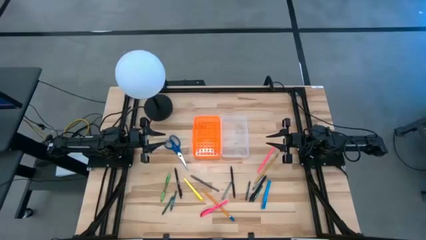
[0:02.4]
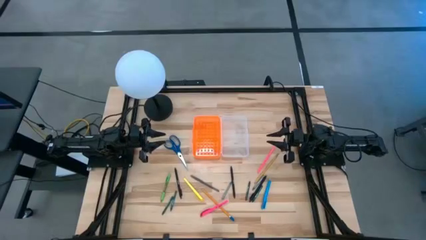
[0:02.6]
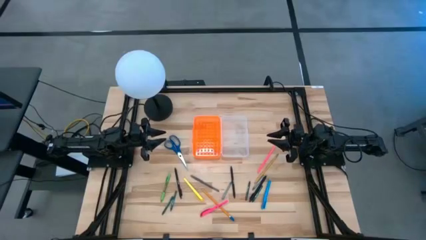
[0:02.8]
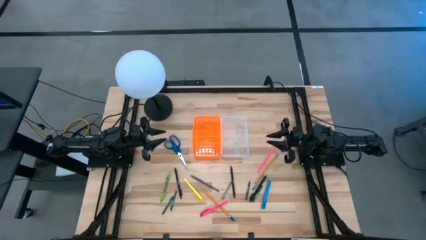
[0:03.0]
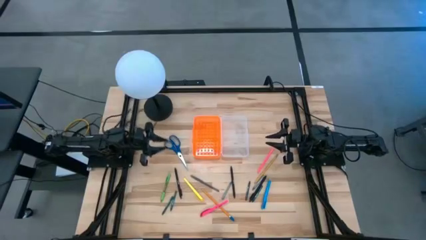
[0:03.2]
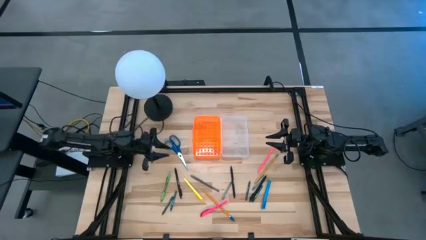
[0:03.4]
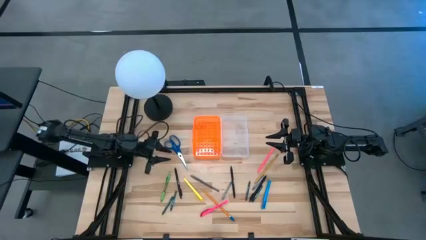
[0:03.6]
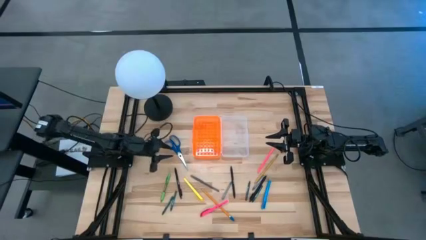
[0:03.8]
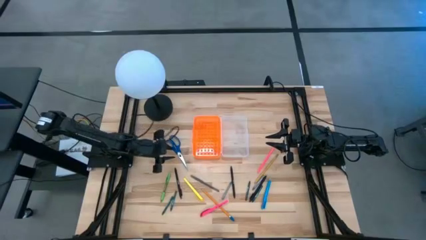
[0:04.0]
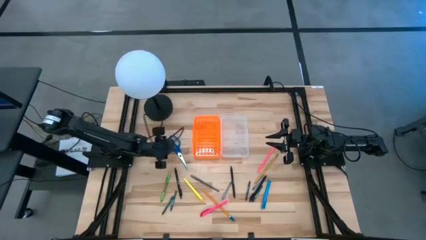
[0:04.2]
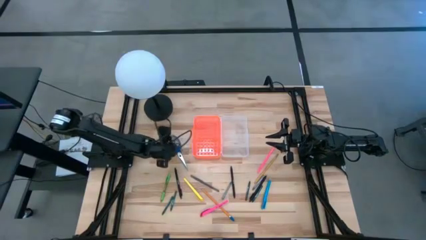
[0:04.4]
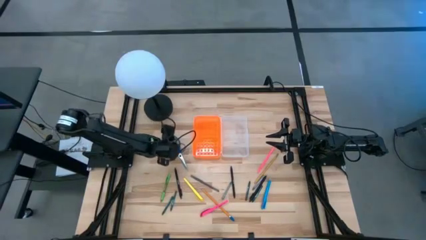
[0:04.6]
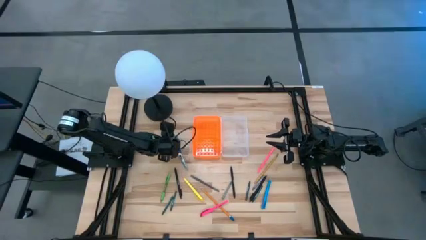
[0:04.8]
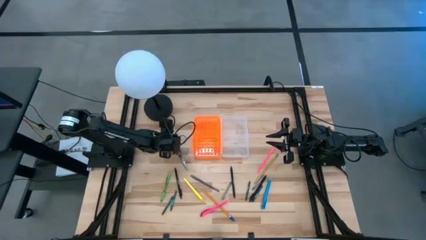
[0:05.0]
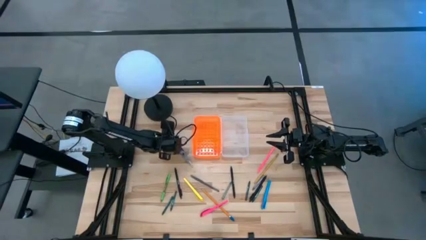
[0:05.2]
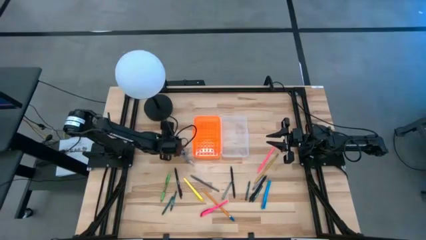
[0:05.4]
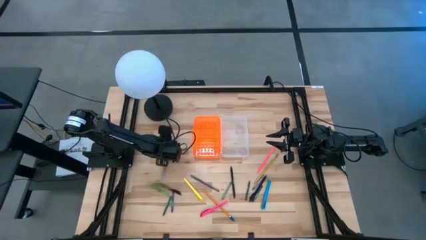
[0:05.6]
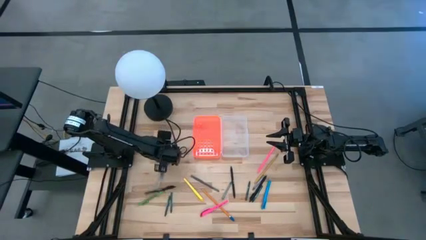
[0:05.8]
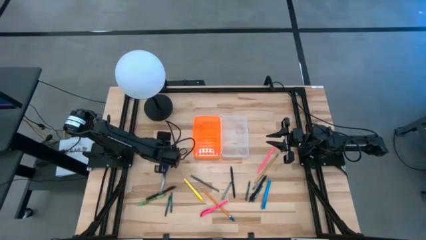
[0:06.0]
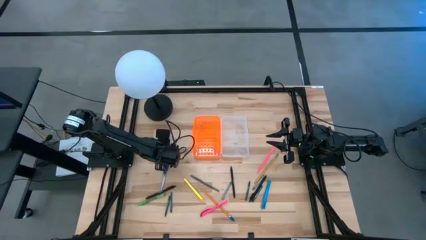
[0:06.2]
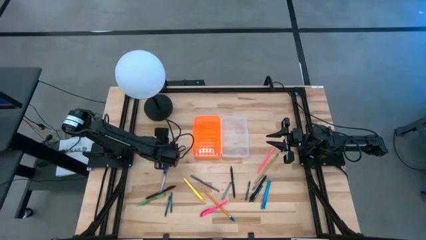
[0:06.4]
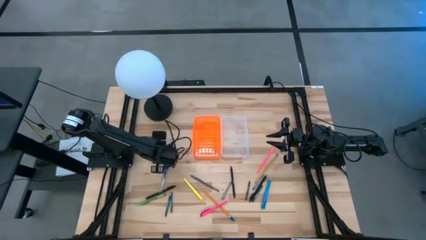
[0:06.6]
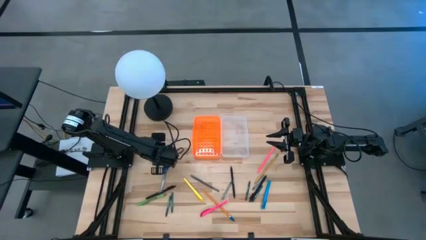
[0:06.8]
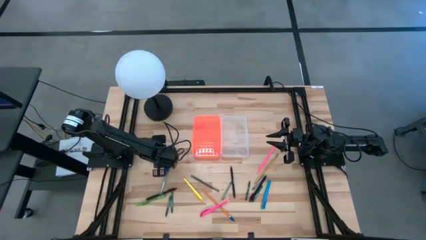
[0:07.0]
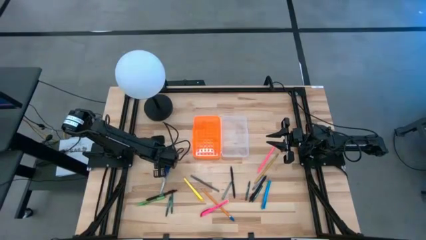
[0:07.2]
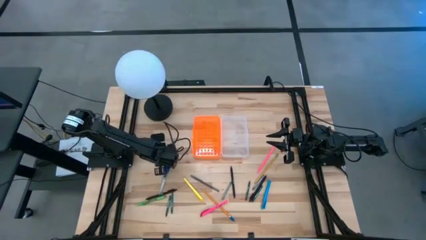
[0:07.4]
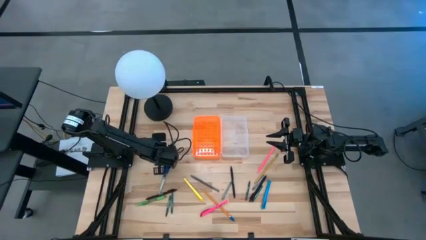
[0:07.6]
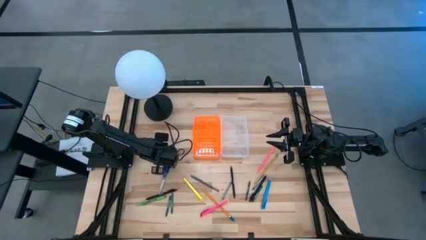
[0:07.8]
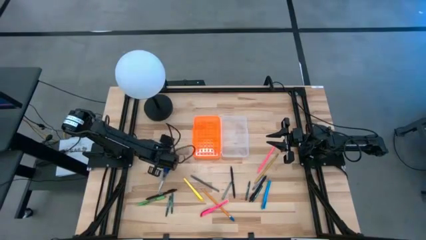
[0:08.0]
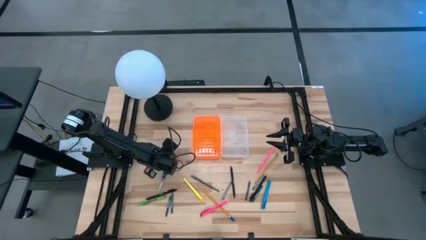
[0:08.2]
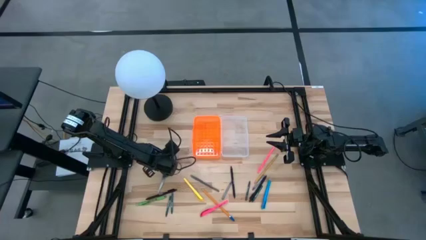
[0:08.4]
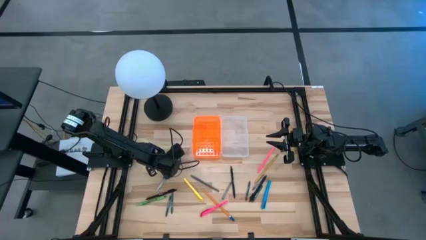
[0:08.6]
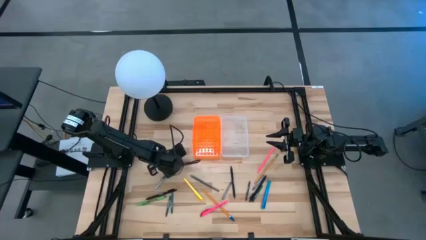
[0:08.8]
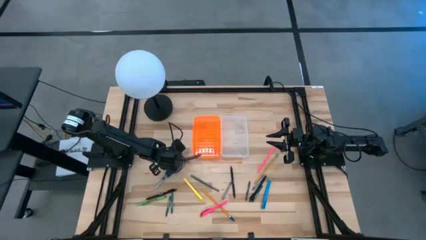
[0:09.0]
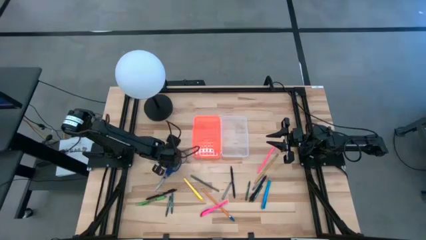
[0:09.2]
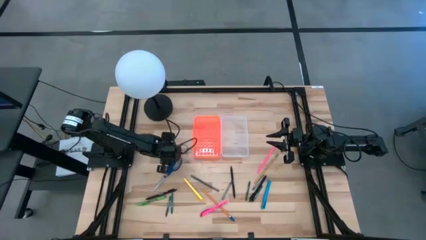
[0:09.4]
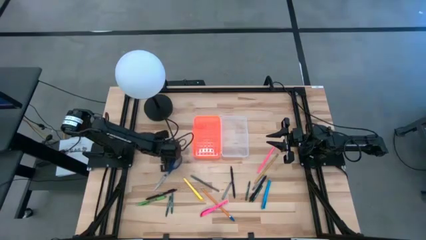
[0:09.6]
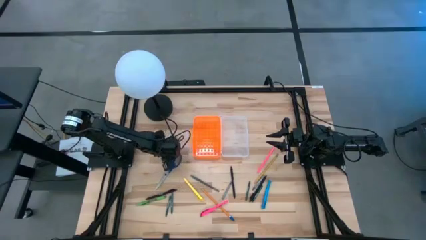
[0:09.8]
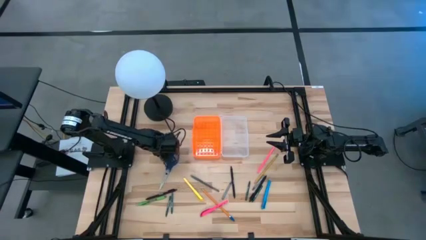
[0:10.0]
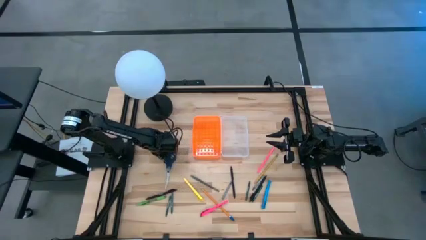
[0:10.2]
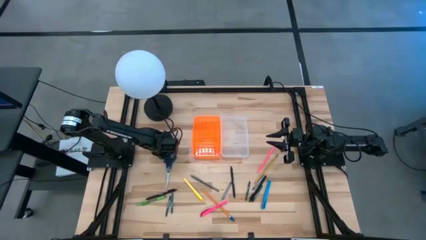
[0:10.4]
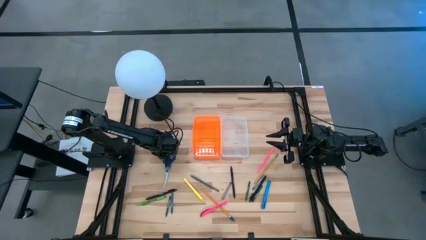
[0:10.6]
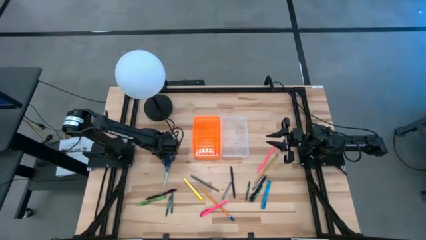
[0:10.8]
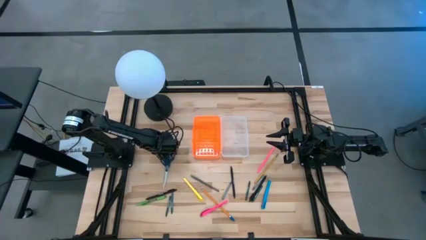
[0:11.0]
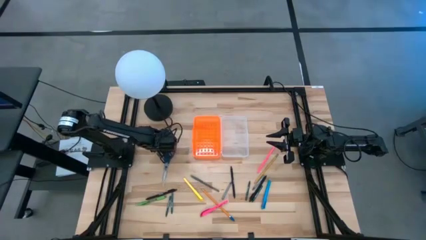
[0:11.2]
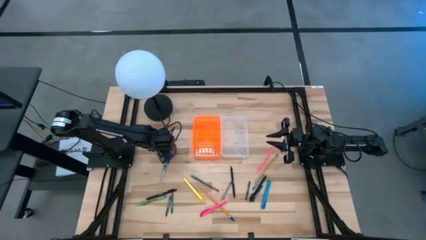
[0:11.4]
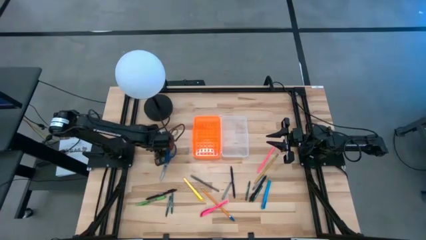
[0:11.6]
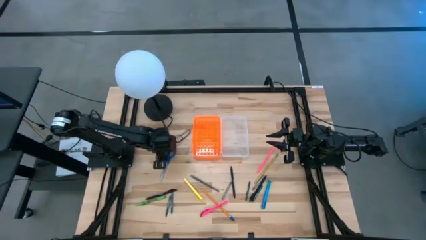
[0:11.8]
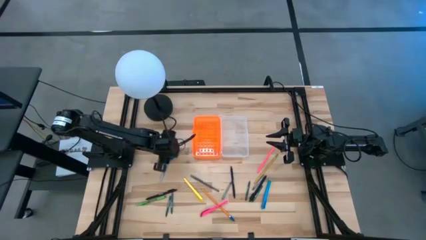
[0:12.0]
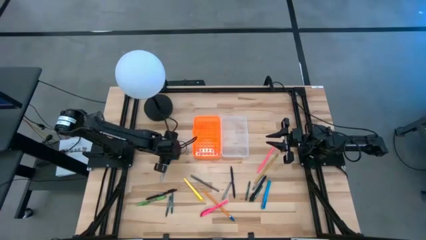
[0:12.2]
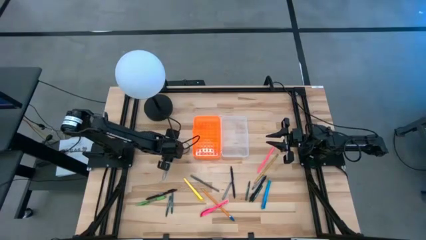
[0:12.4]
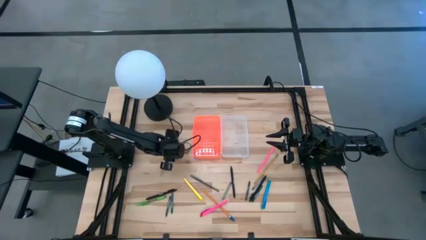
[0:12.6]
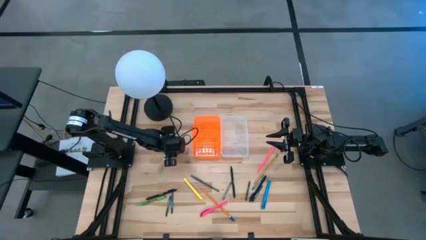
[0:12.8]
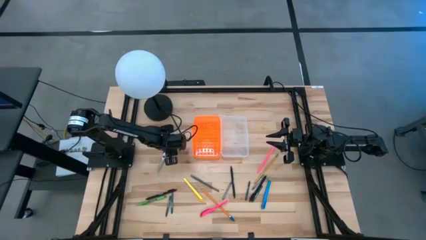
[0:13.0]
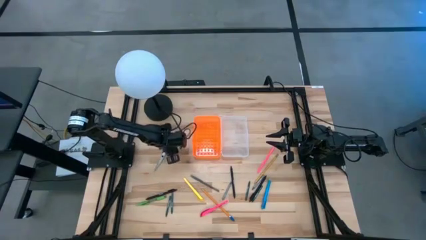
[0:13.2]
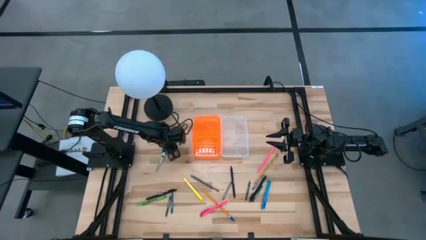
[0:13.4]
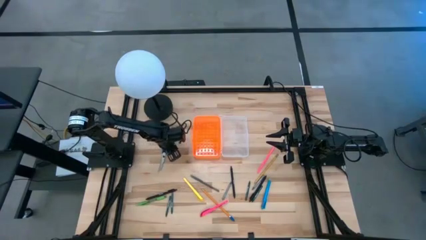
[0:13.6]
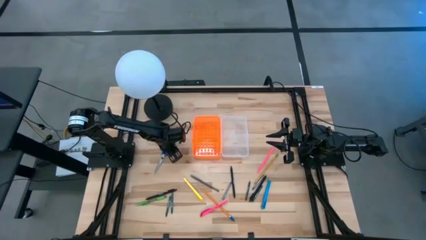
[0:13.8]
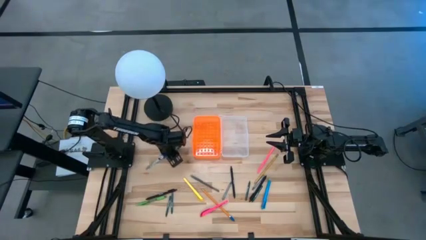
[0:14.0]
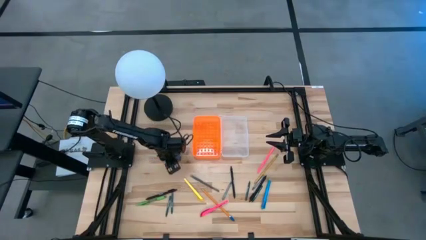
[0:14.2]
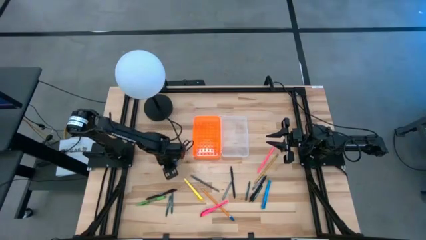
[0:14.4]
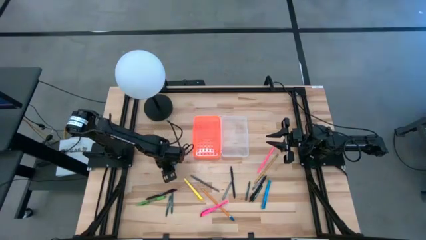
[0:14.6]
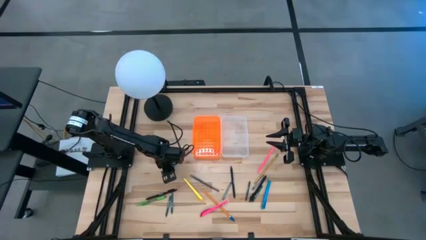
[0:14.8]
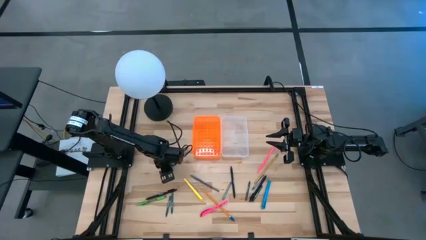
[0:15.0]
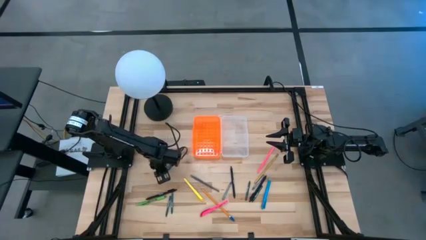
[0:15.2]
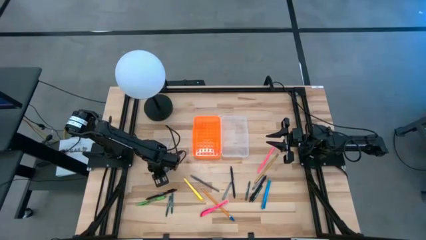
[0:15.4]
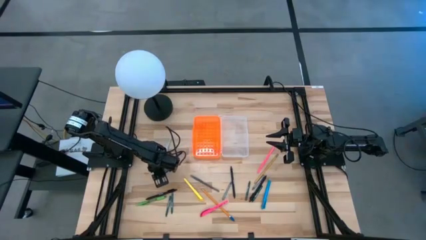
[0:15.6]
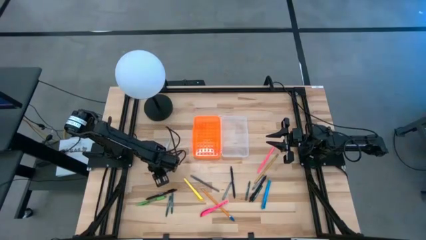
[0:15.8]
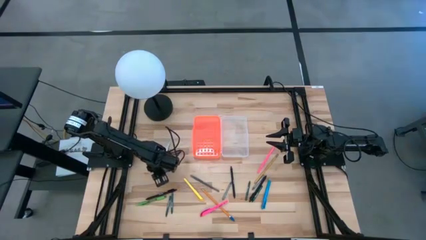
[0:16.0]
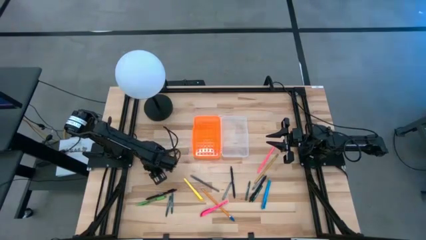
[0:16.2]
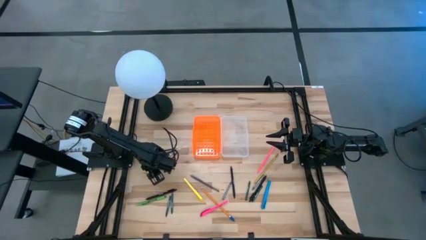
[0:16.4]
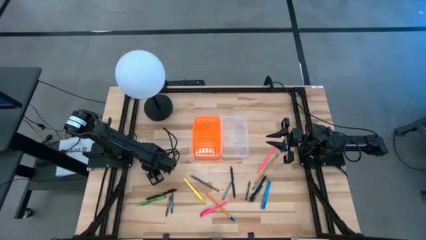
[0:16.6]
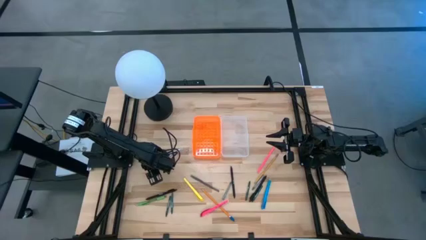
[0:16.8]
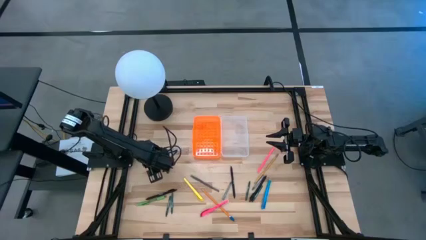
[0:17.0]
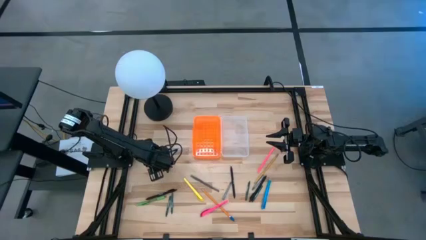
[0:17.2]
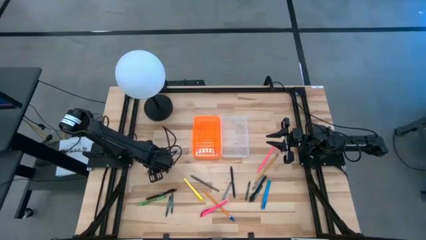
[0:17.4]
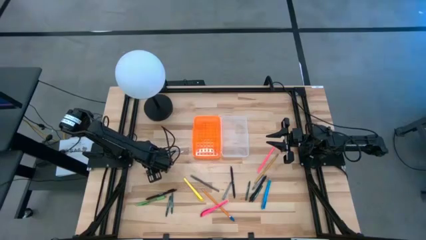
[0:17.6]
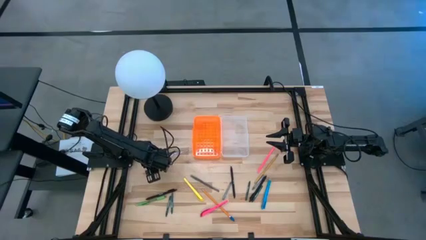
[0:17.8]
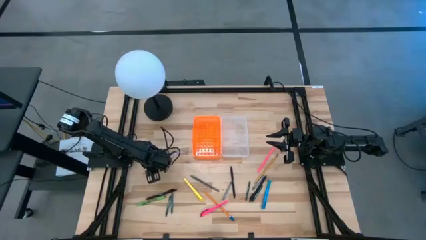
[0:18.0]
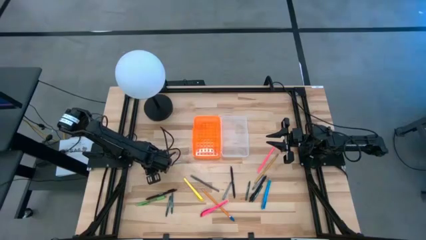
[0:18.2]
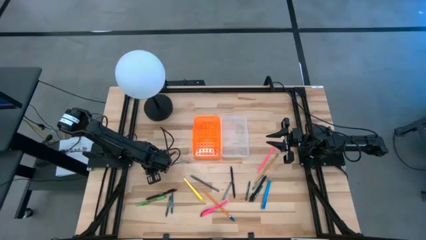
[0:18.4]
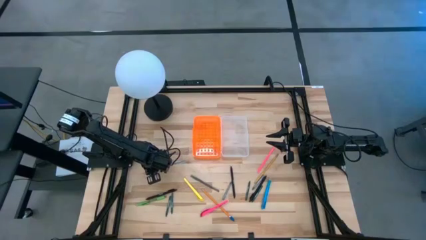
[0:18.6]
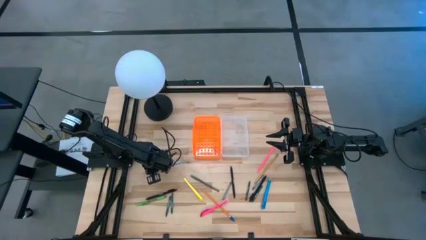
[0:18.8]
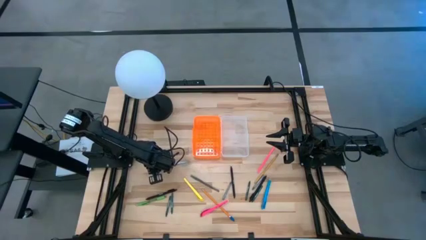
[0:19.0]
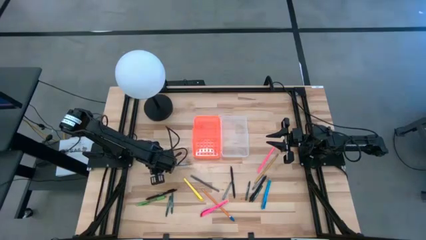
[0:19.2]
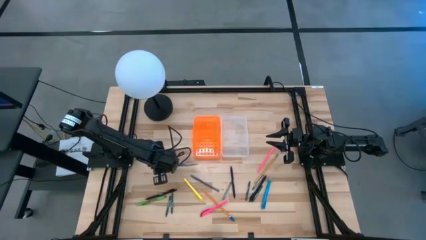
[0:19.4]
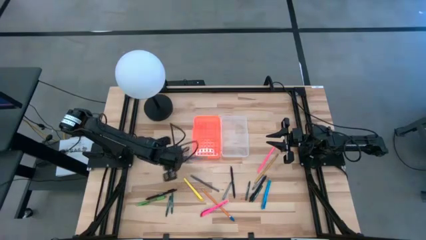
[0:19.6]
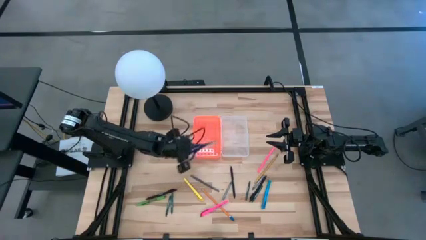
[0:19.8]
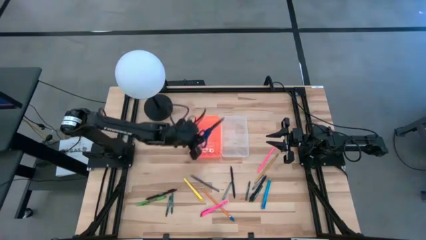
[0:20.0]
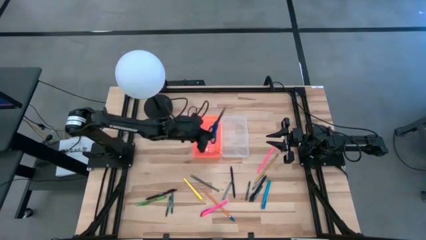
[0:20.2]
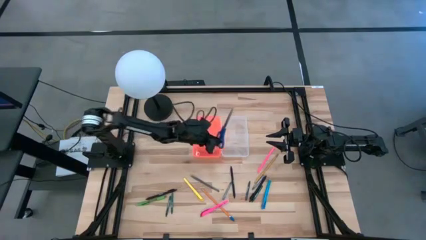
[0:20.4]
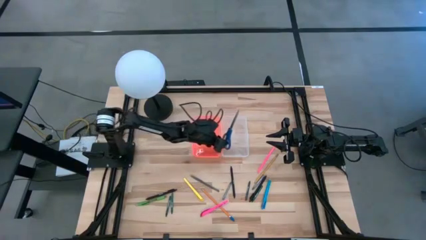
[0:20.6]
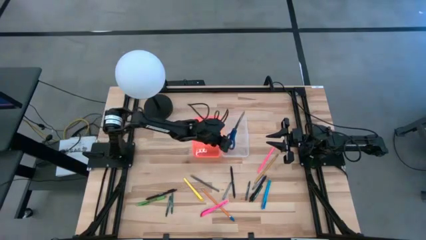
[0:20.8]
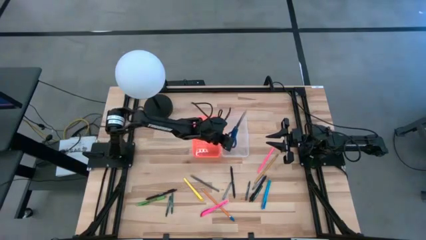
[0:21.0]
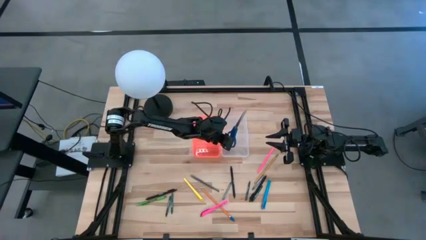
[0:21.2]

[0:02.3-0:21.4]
Task: Pick & place school supplies into a supply box
Put the scissors into the orange supply box
